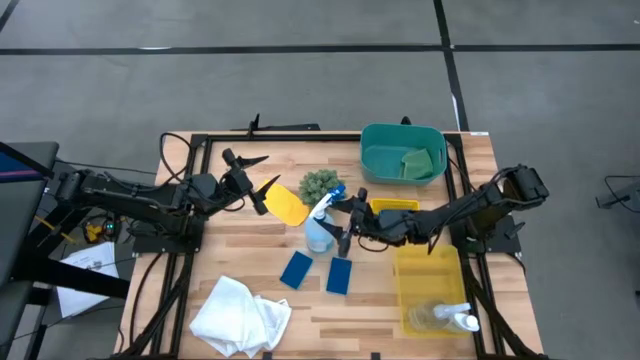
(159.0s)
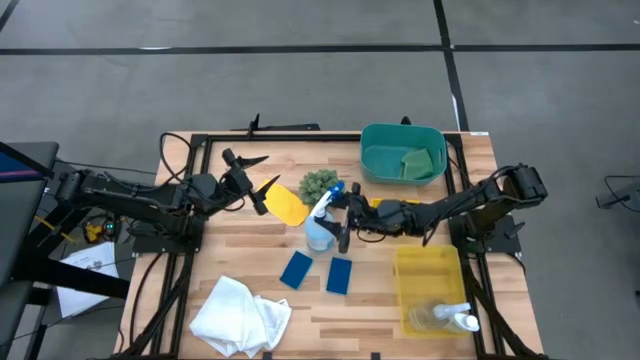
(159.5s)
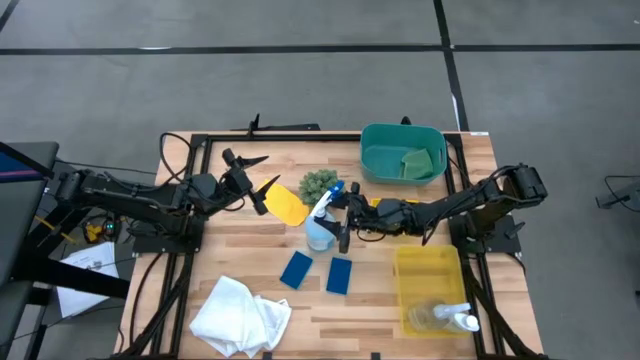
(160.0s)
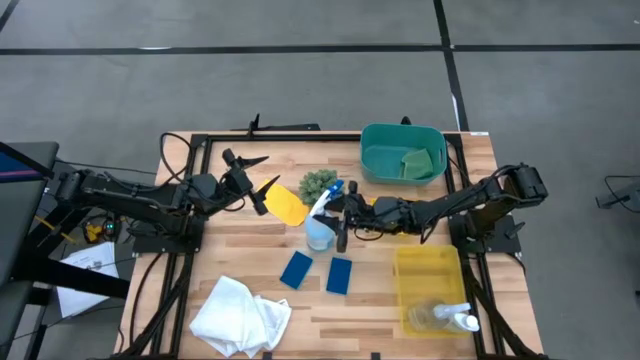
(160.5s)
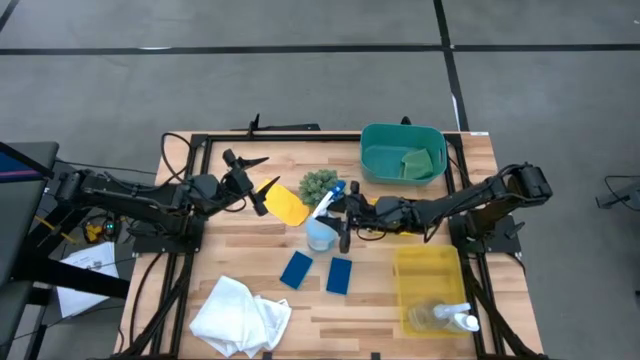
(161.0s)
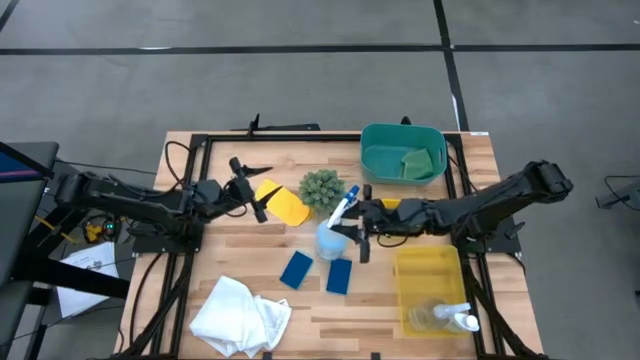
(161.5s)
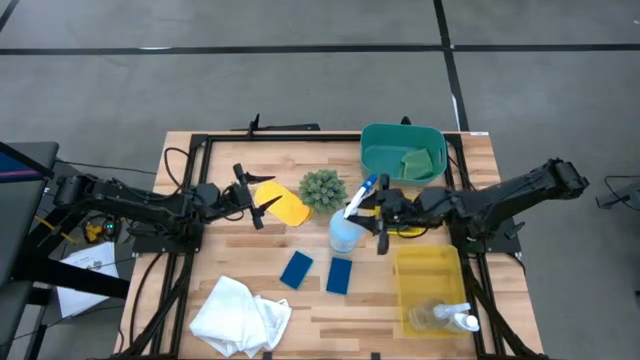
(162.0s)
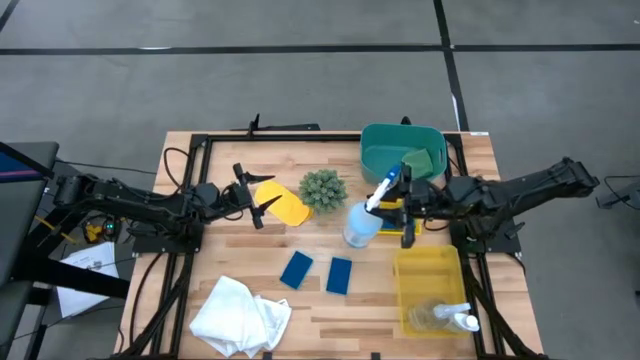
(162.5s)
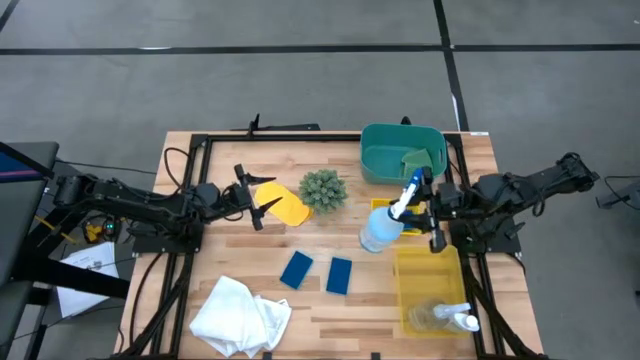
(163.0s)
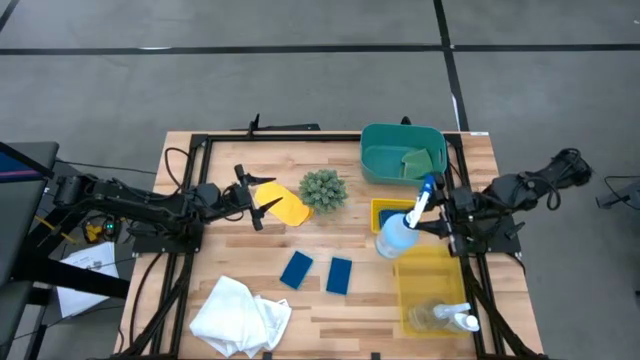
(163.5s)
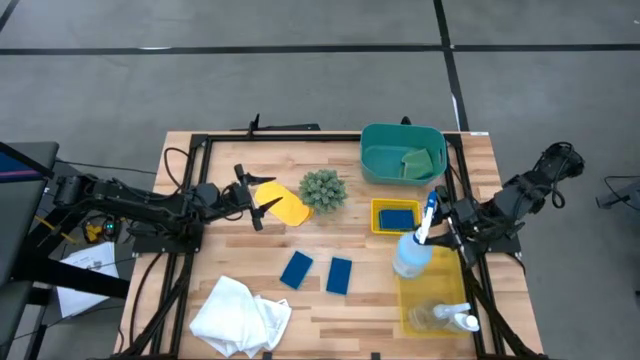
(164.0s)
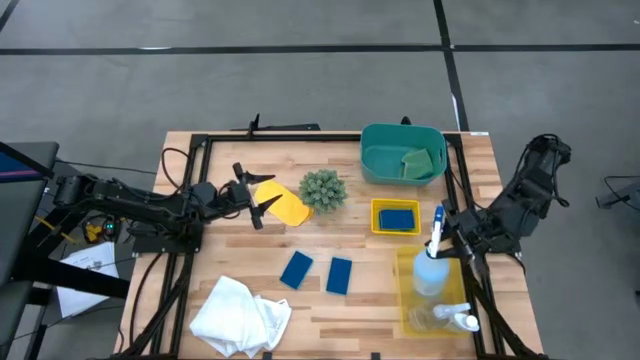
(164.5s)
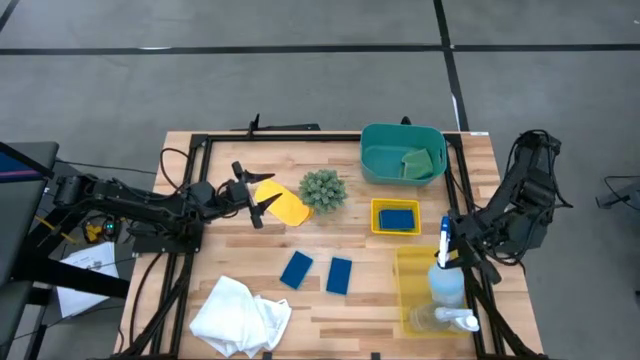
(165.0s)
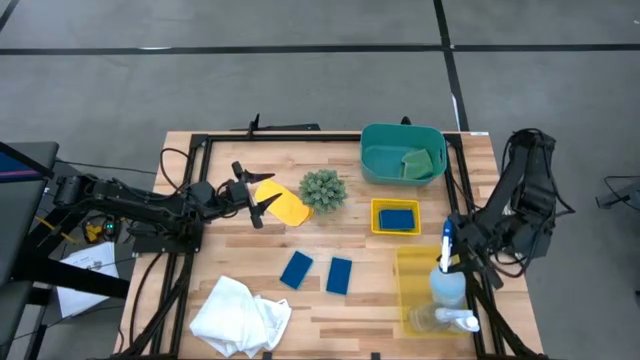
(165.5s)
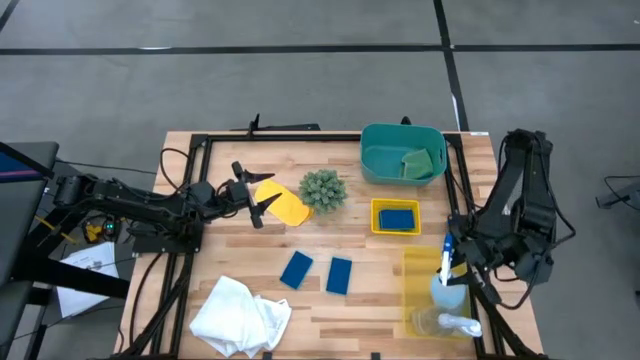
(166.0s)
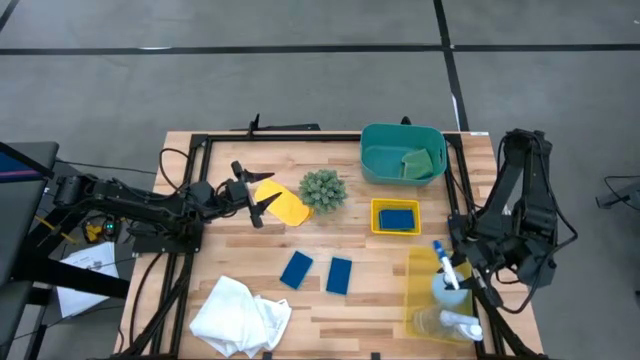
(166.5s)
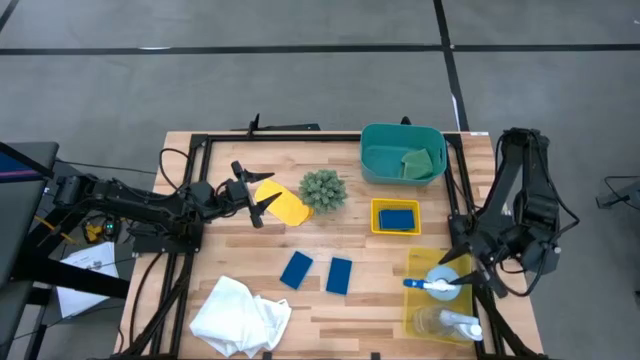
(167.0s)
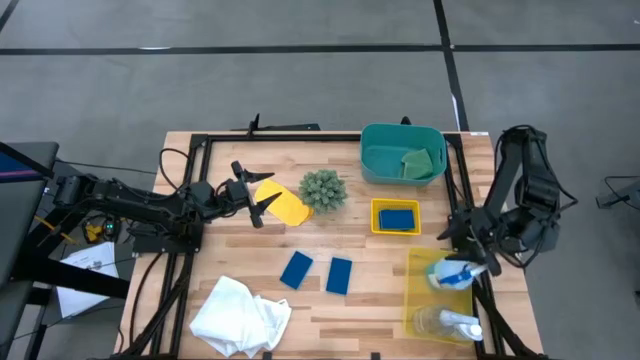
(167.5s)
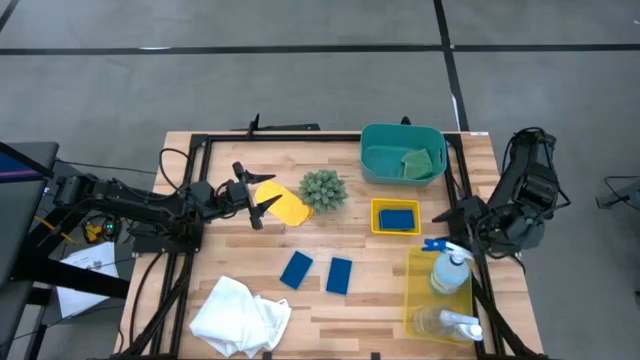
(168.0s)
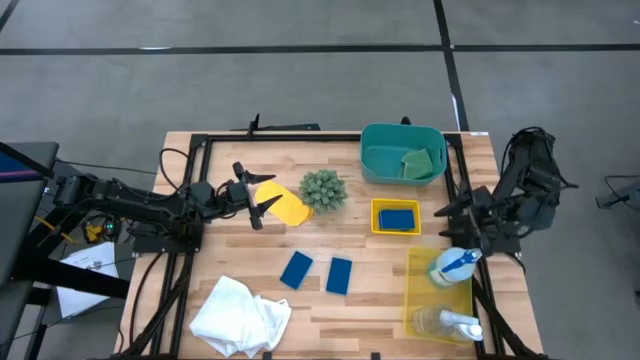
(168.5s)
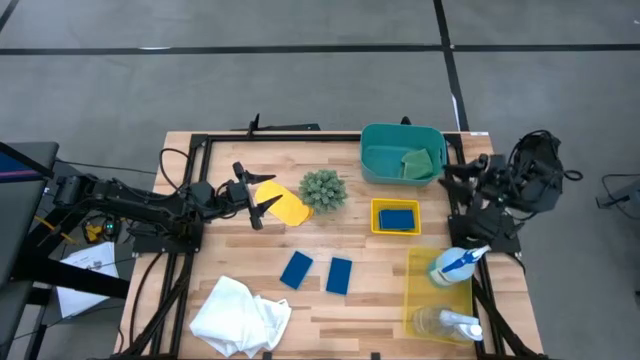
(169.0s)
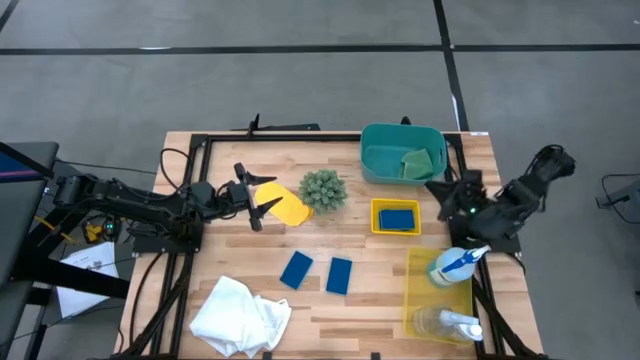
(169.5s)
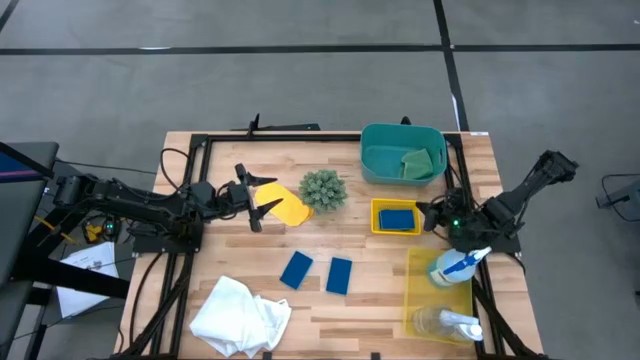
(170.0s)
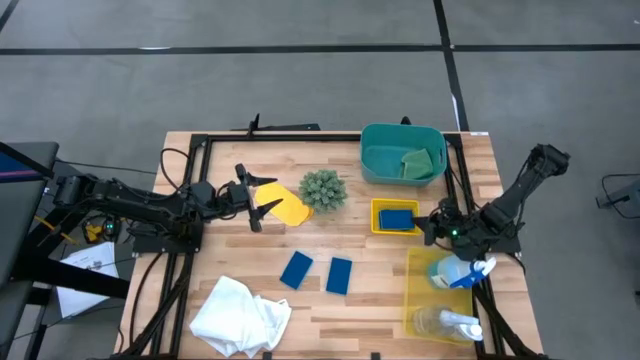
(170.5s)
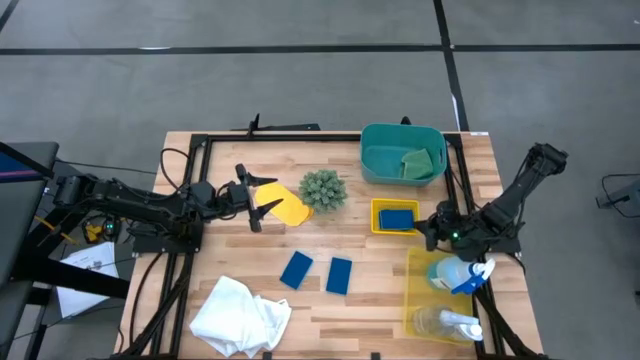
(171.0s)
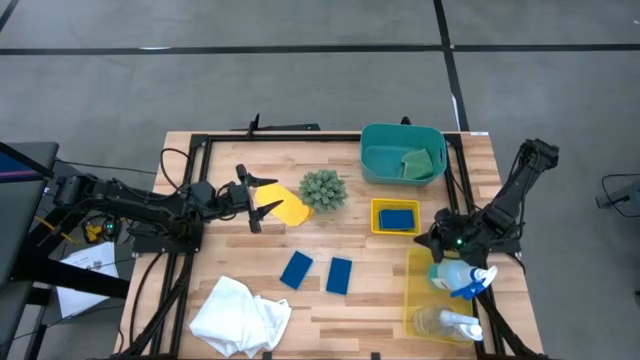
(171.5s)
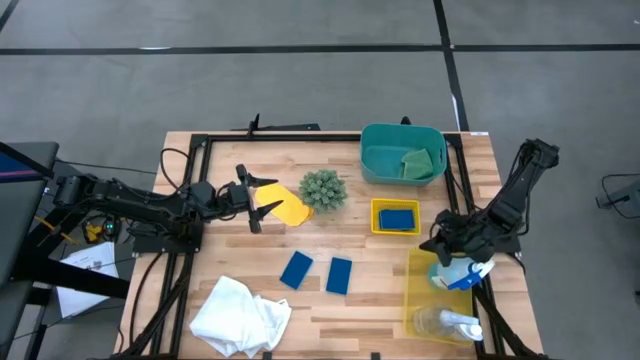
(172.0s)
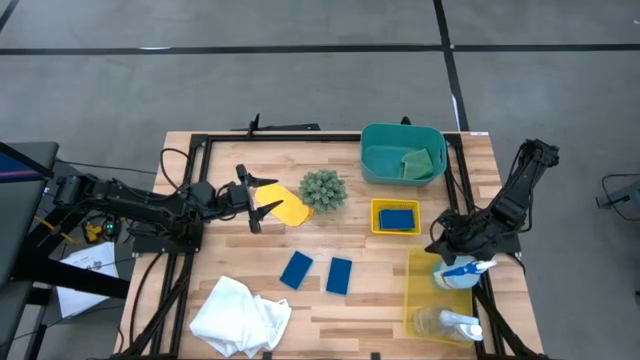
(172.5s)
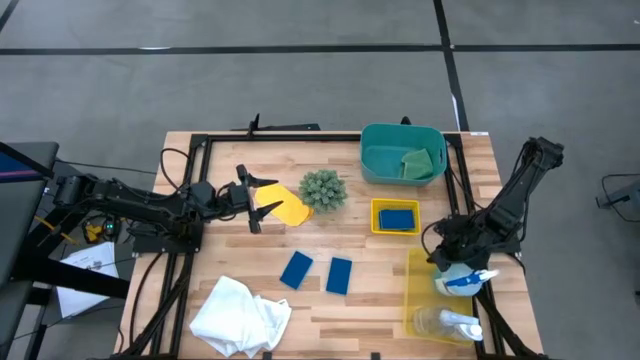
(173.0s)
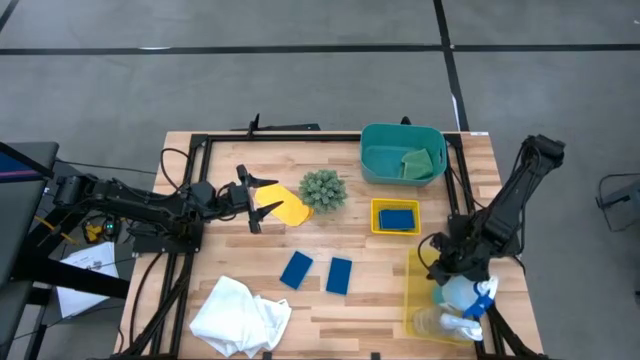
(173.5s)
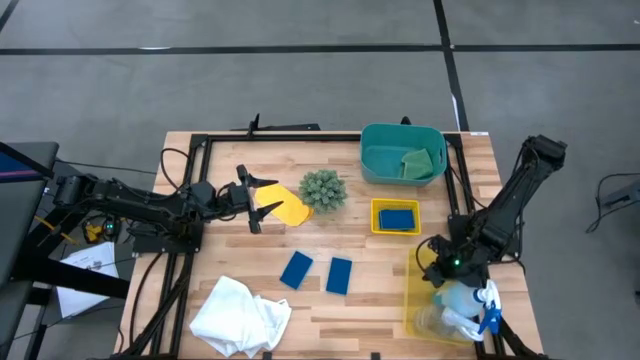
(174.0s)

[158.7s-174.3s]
Task: Pick & Place Kitchen Items
Put the white bottle into the bottom yellow bin

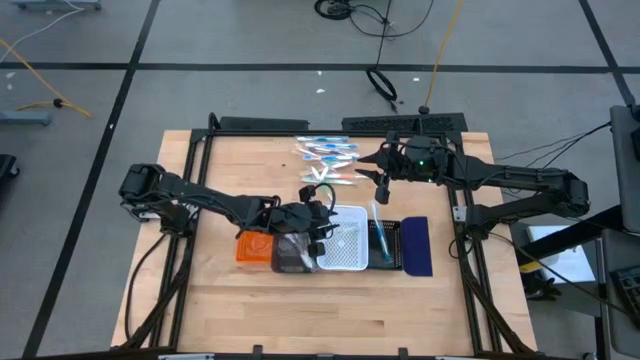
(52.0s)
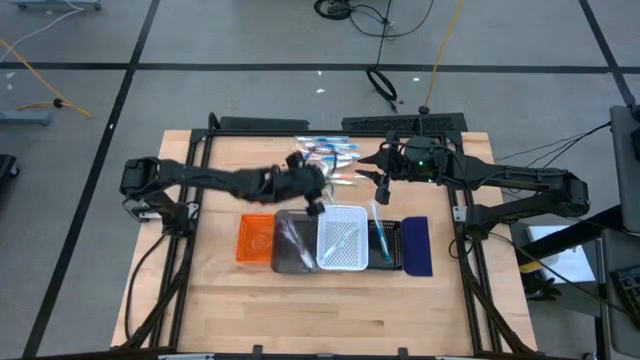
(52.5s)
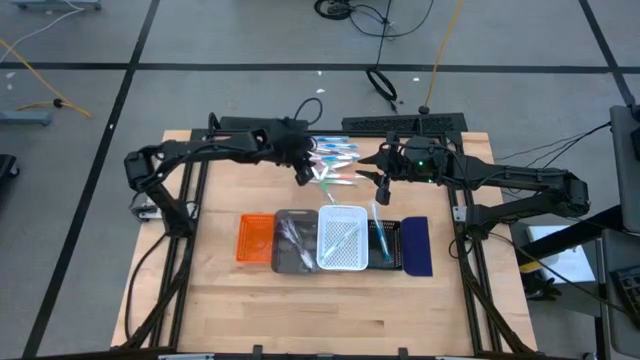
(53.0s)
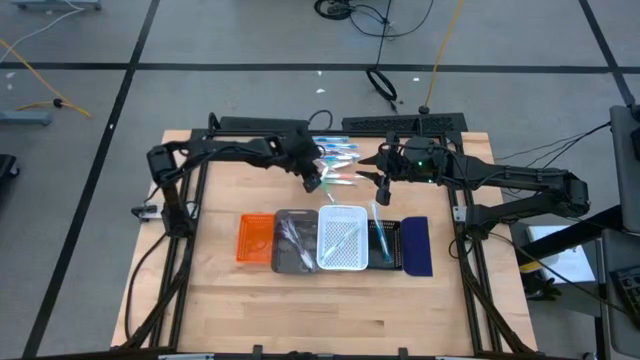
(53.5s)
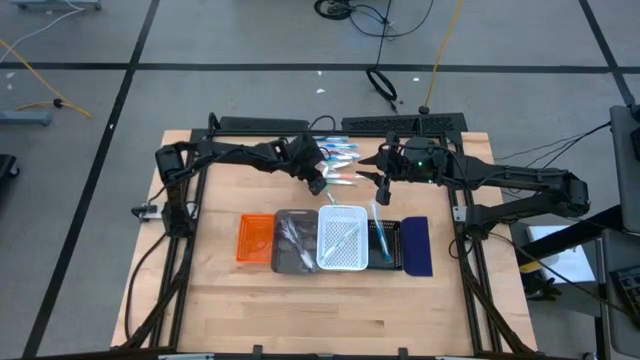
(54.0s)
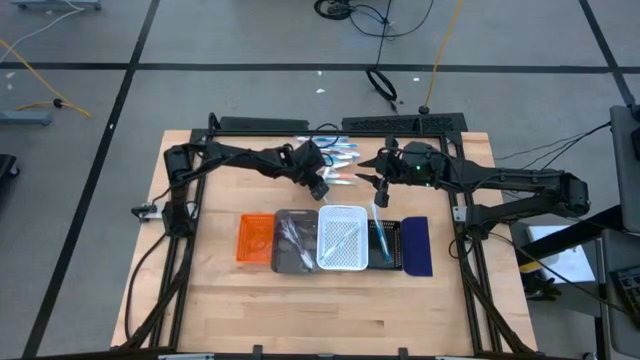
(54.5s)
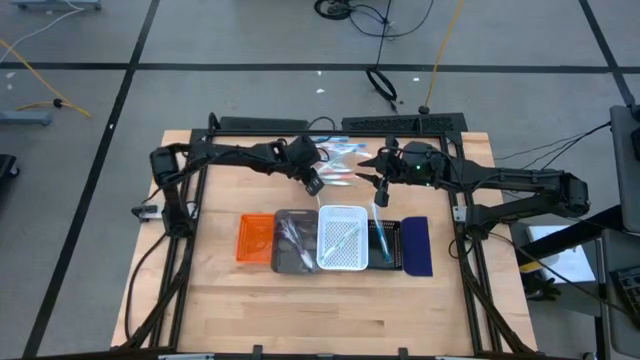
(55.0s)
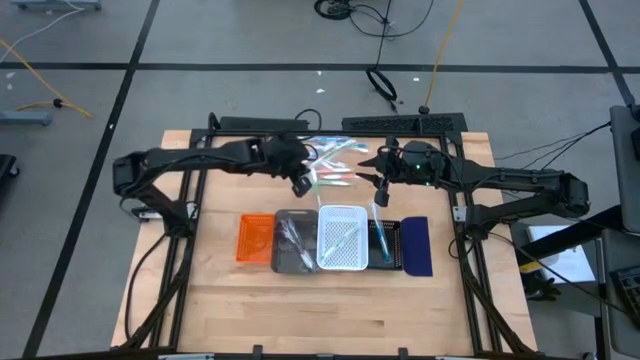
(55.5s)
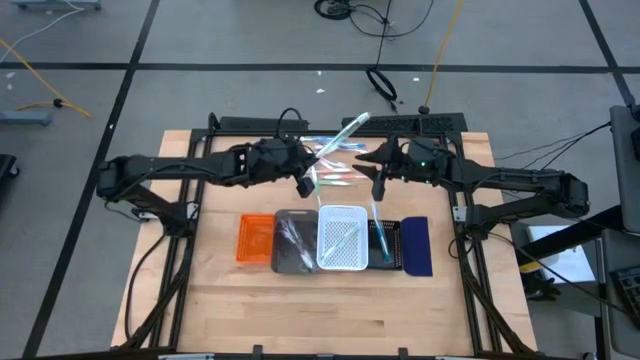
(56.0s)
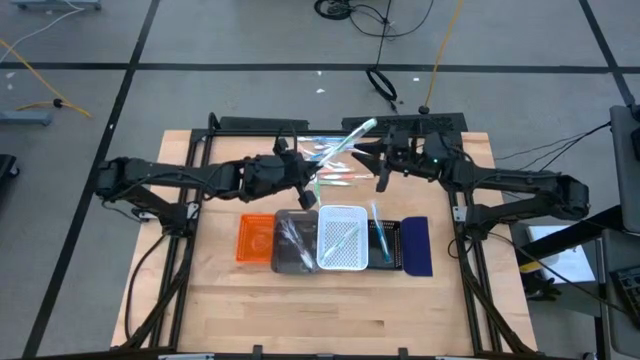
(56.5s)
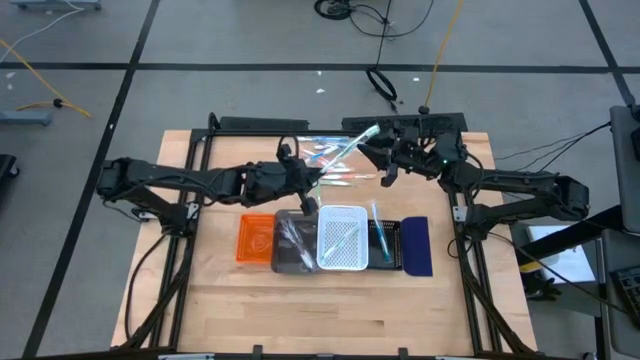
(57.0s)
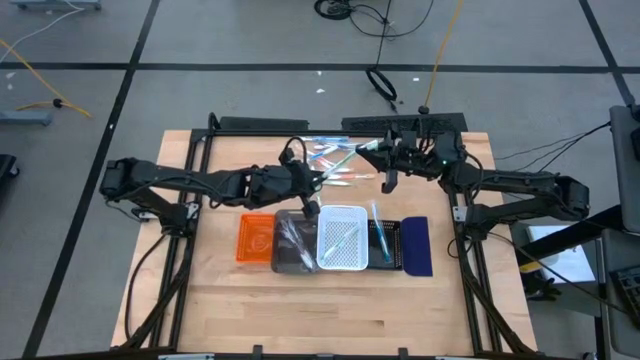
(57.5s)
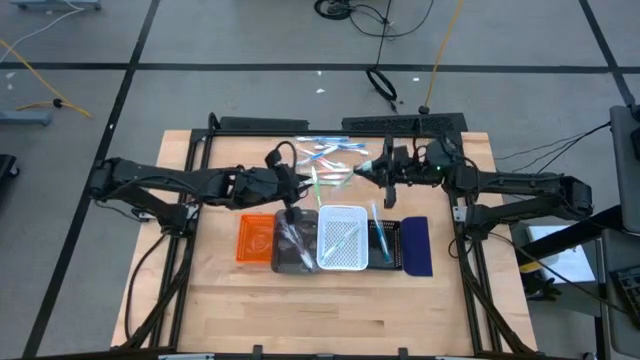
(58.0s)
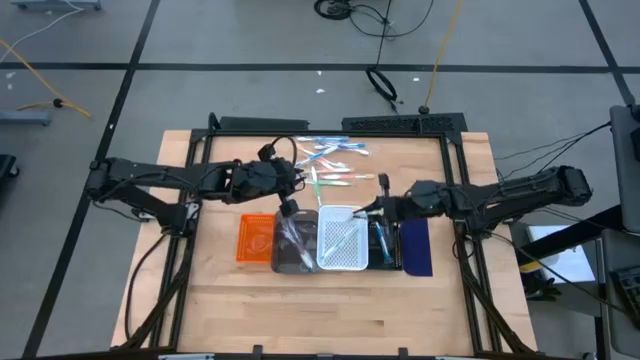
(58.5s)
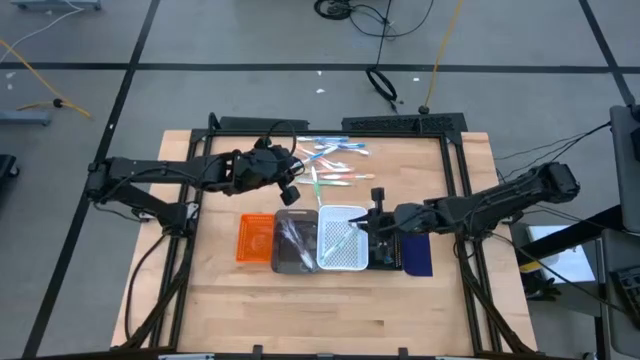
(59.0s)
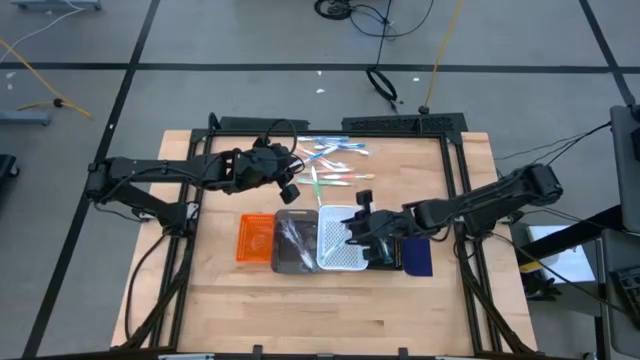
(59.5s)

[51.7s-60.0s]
Task: Pick & Place Toothbrushes
Put the green toothbrush into the white bin
